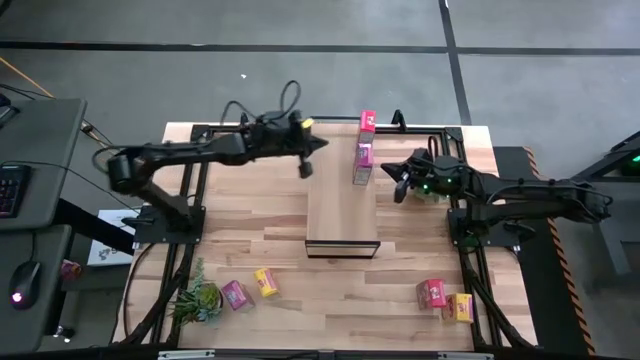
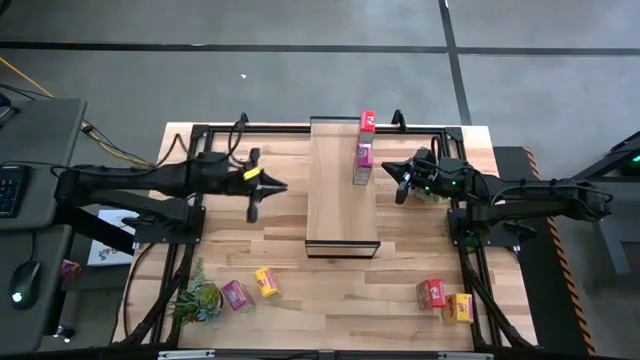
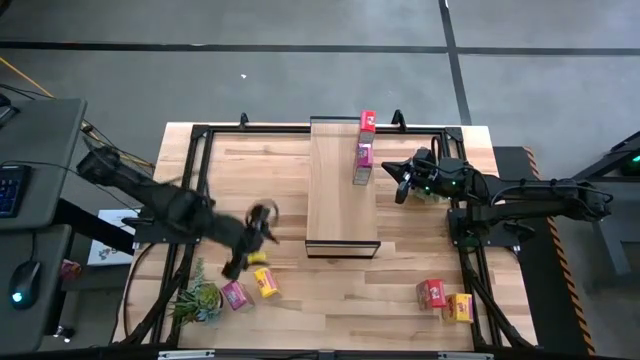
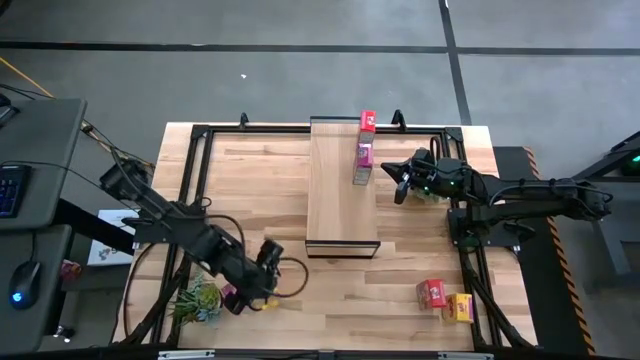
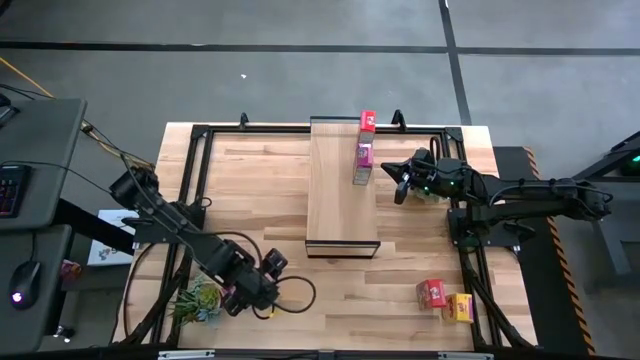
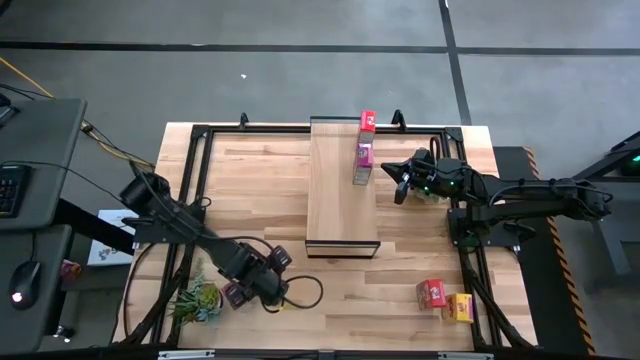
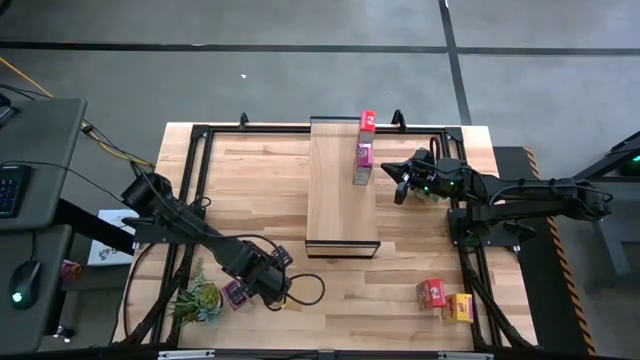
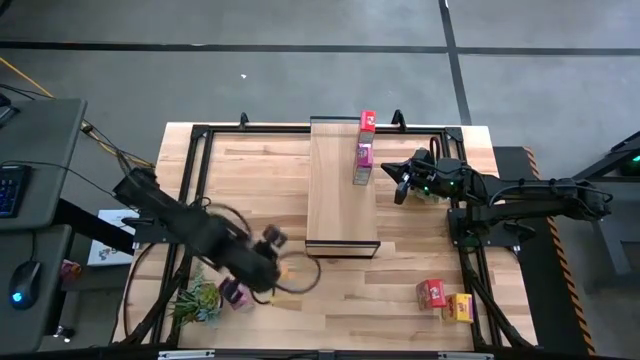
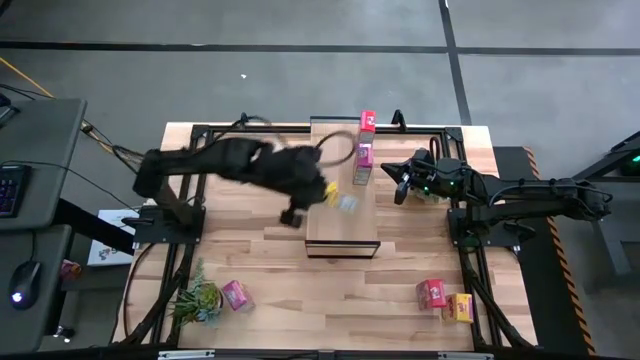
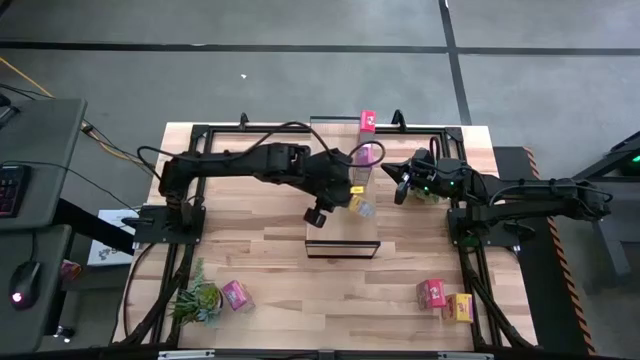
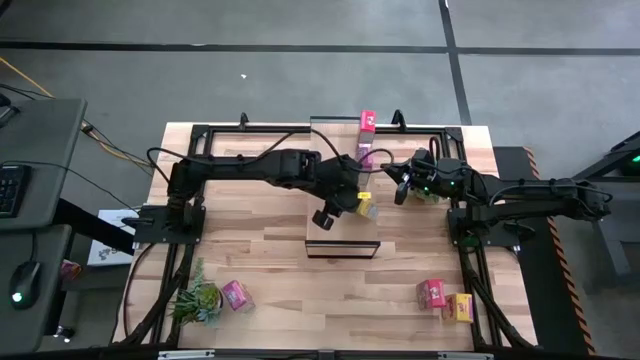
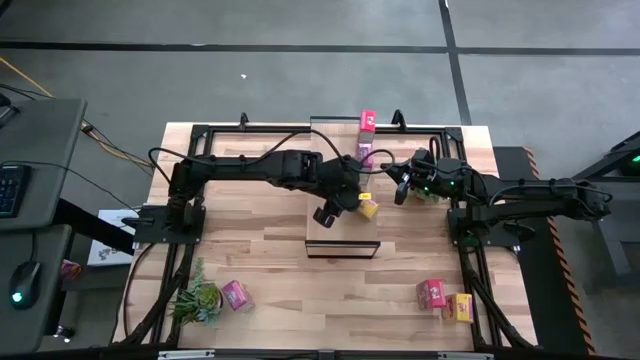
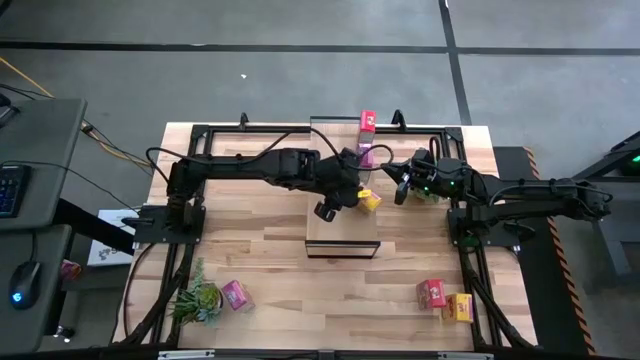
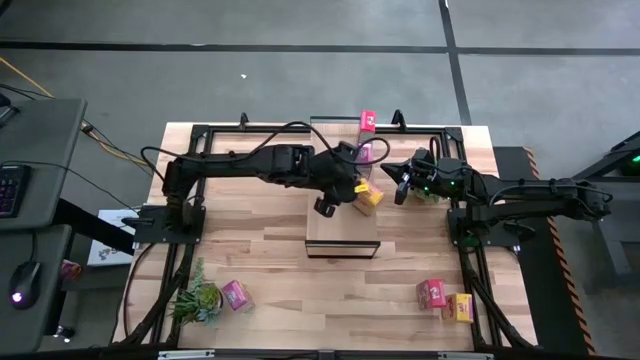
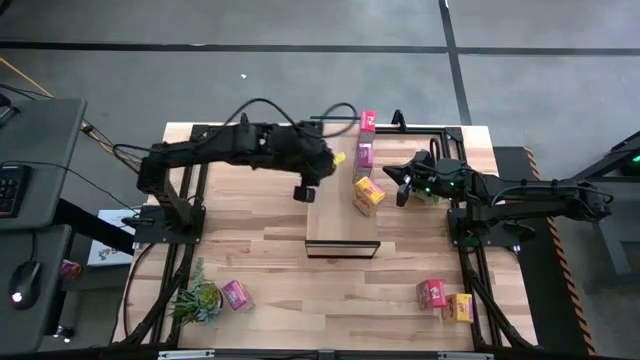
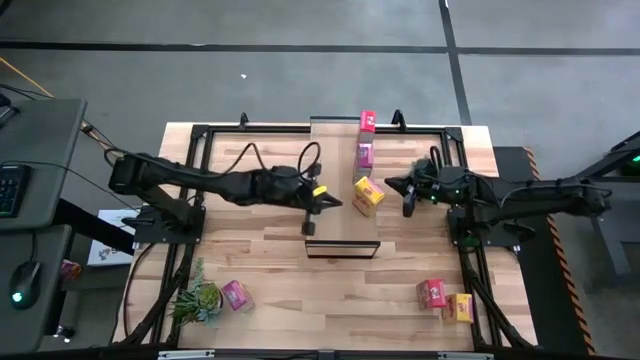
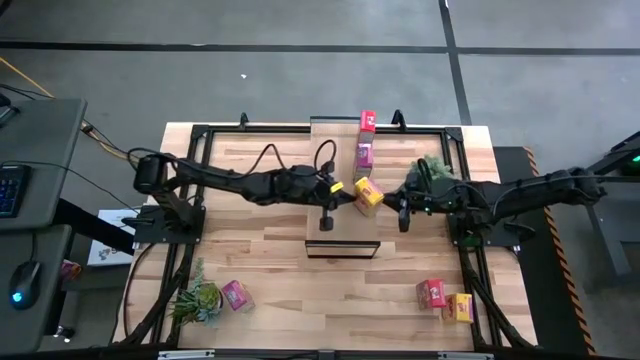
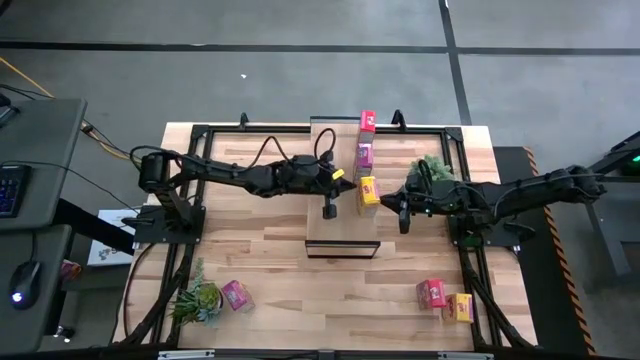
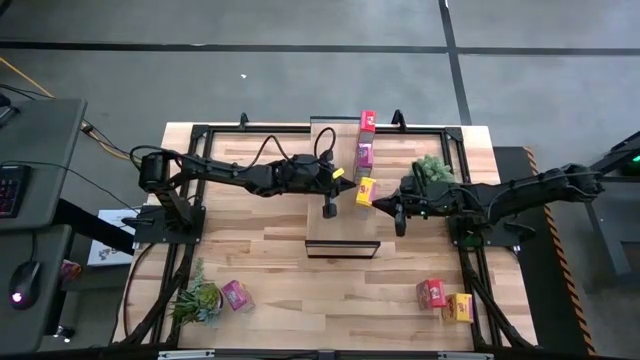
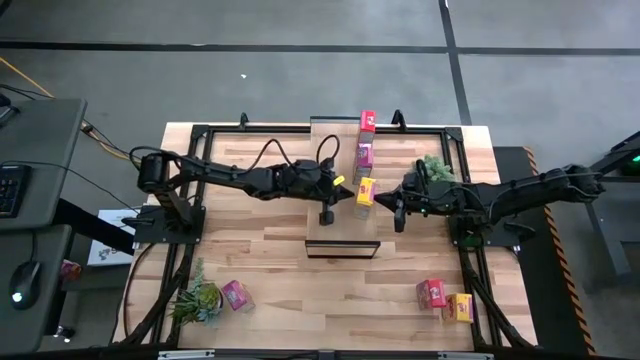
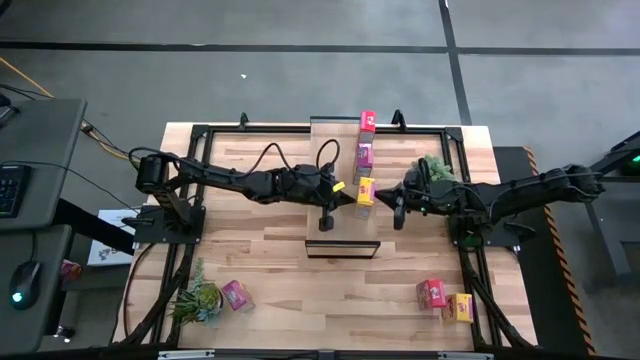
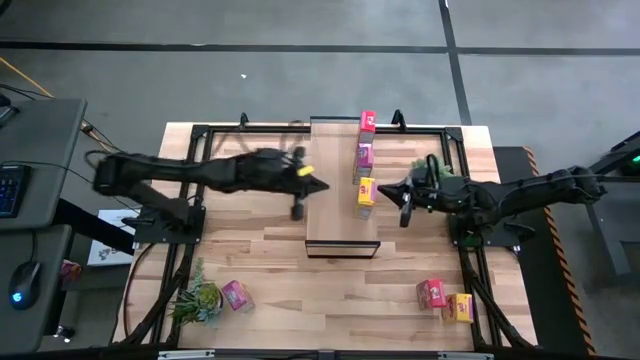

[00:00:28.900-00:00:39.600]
Task: Stack cereal on shelf
Put the left yellow cereal box on the shelf

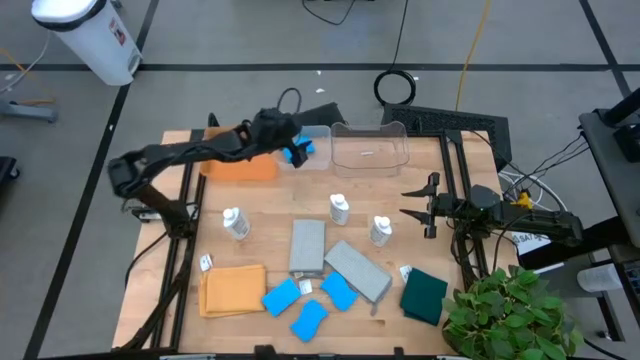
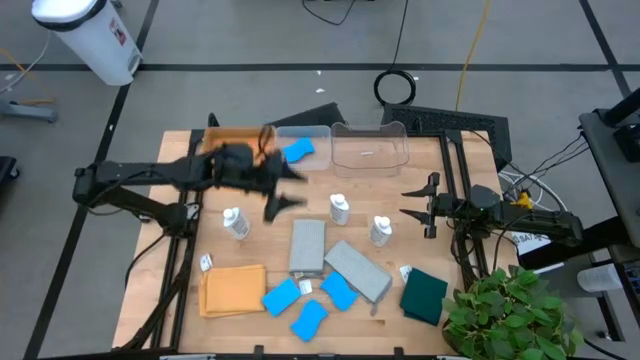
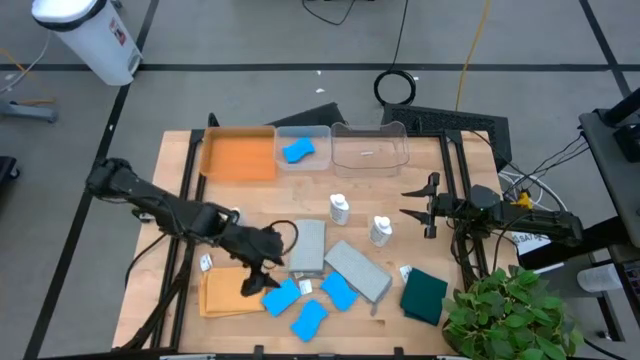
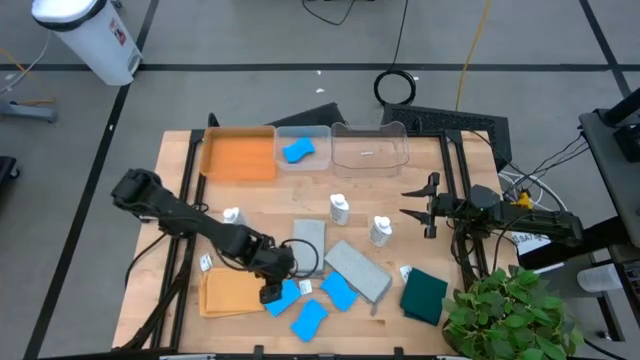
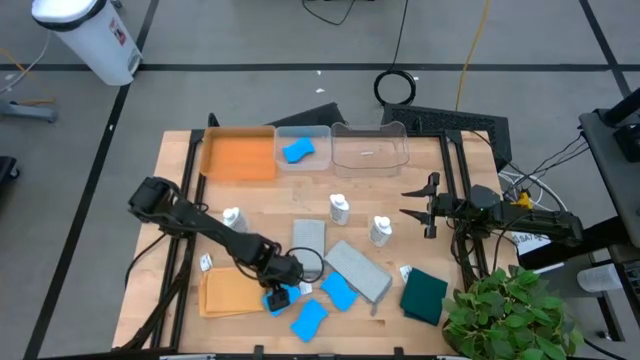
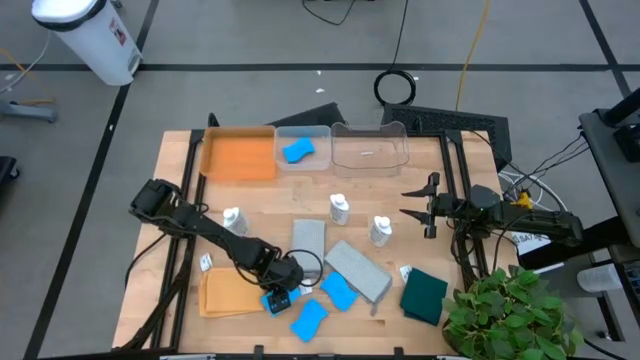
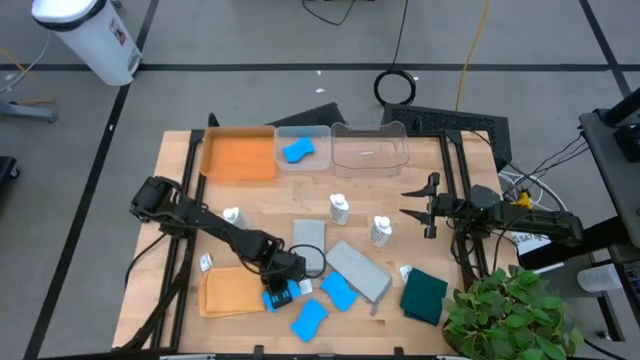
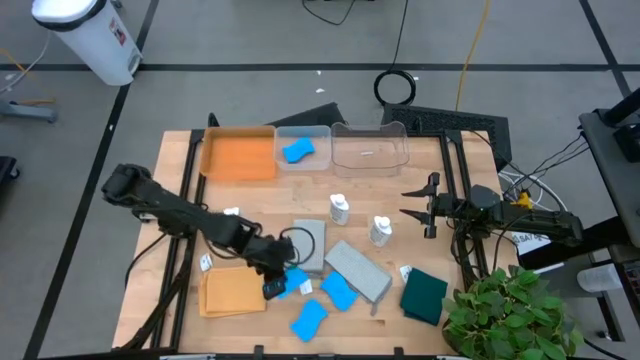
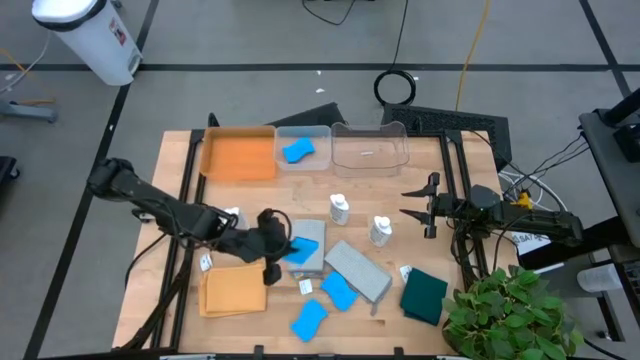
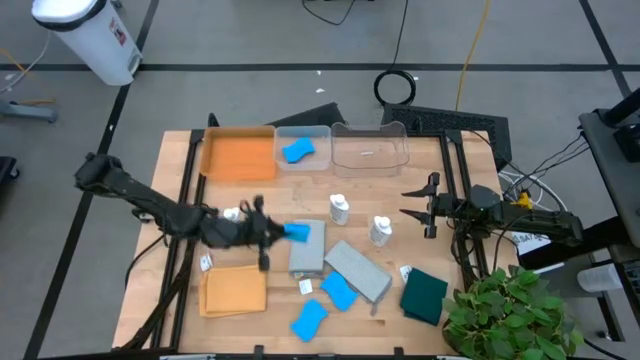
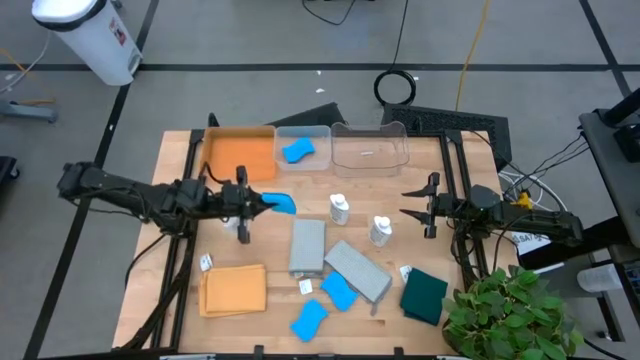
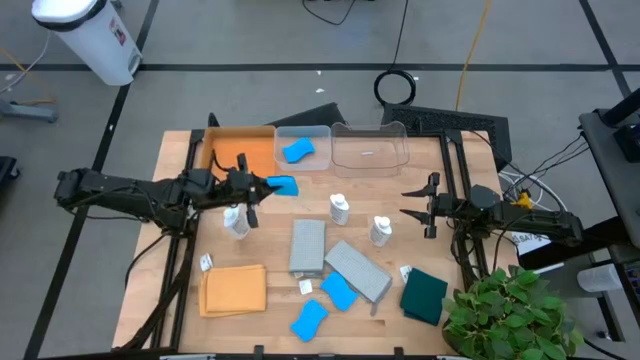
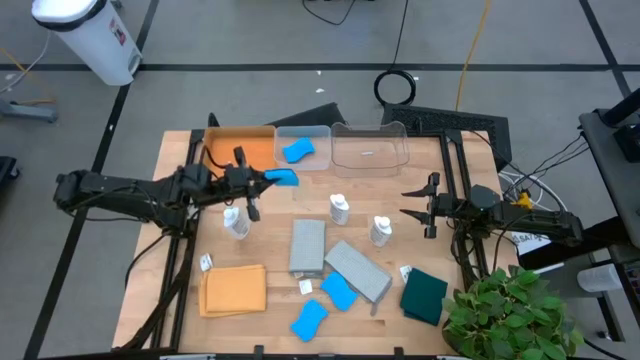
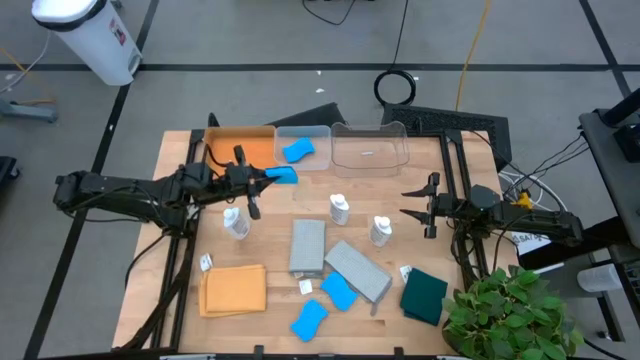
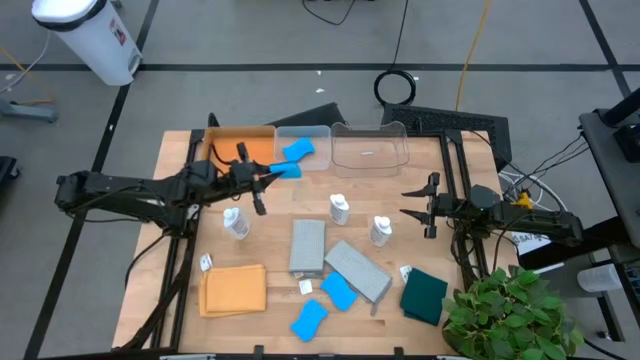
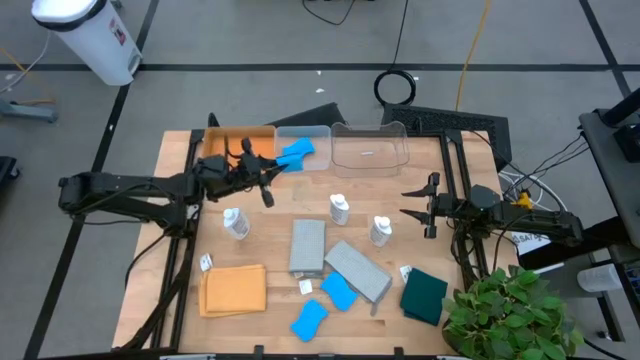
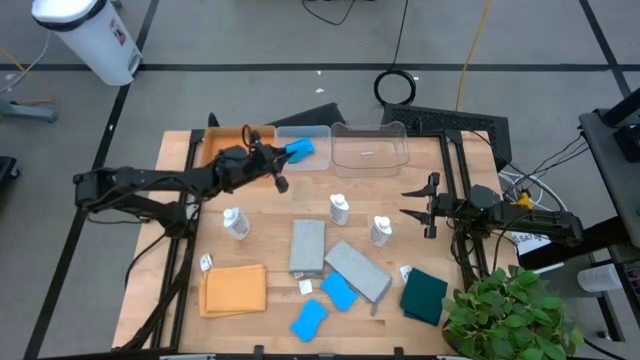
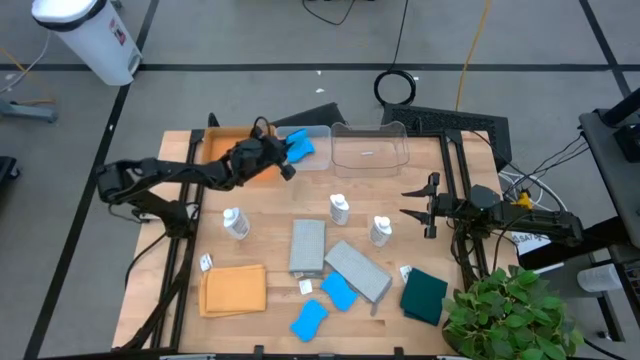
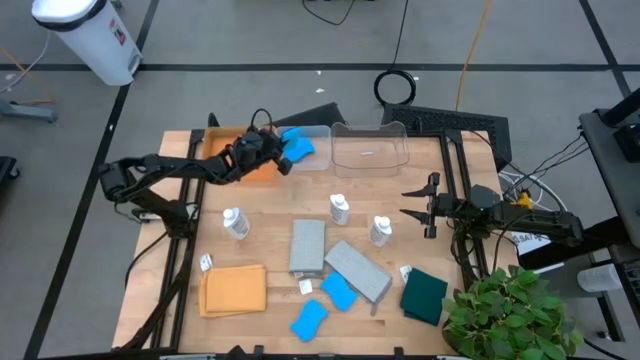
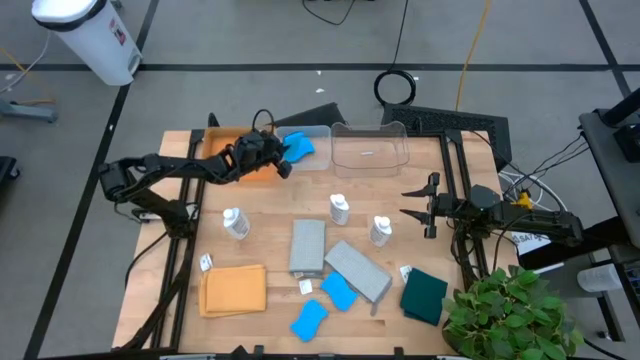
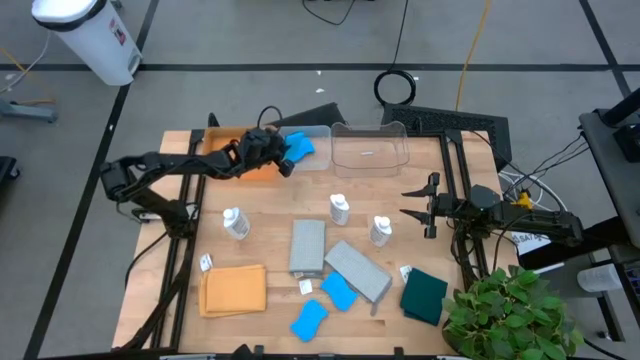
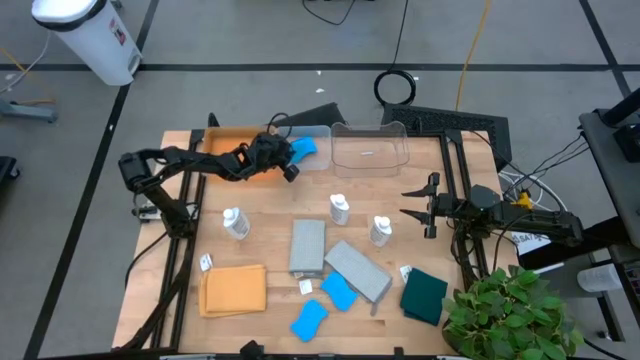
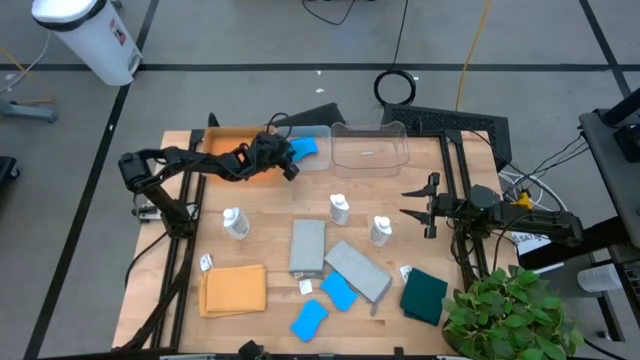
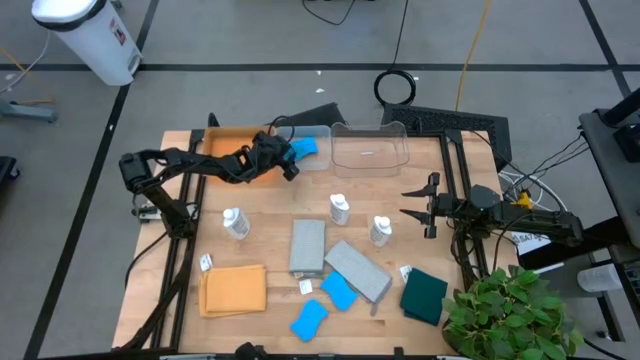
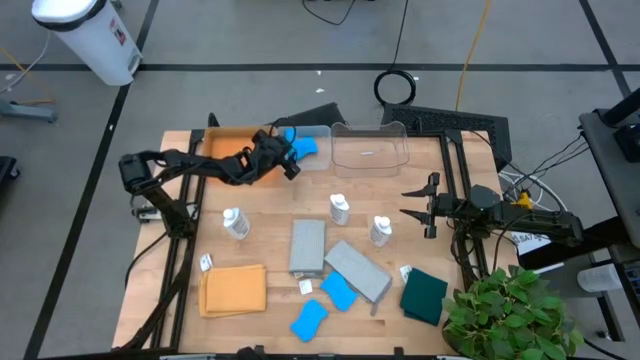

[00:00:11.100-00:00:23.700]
Task: Pick & Place Kitchen Items
Put the blue sponge into the left transparent bin
